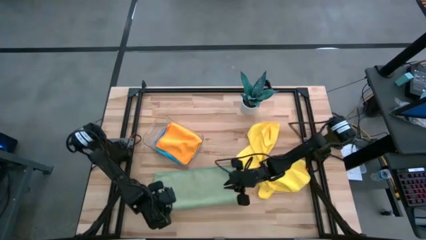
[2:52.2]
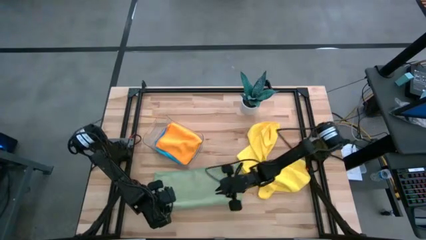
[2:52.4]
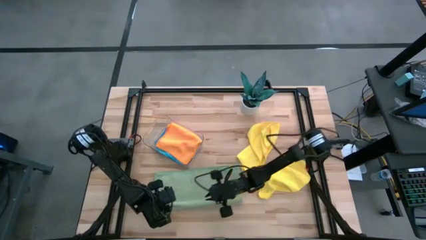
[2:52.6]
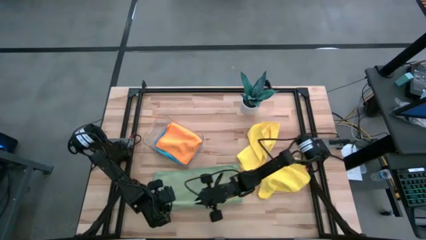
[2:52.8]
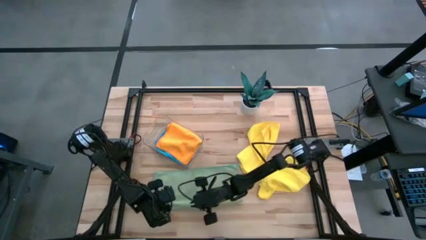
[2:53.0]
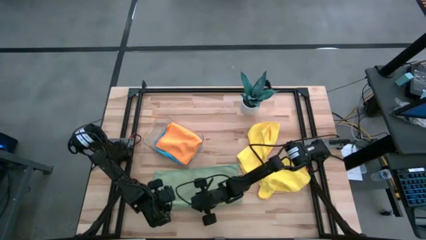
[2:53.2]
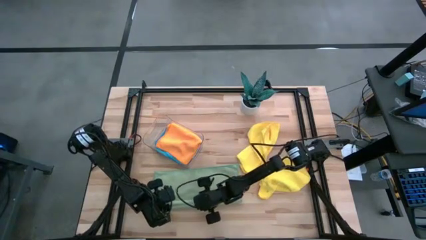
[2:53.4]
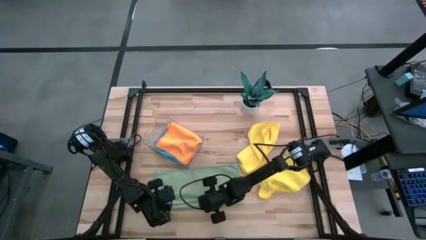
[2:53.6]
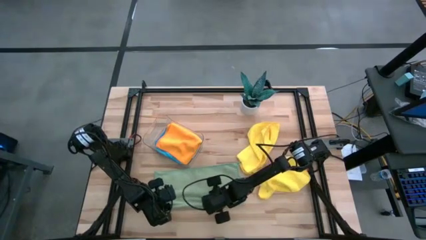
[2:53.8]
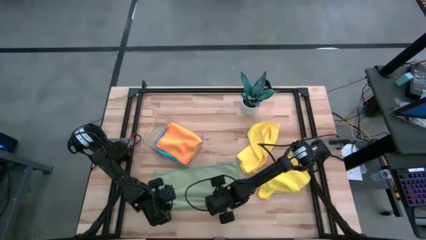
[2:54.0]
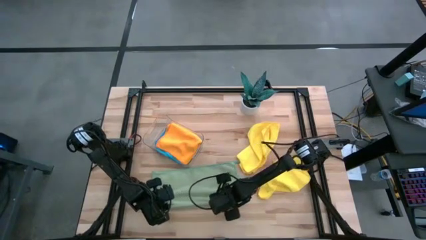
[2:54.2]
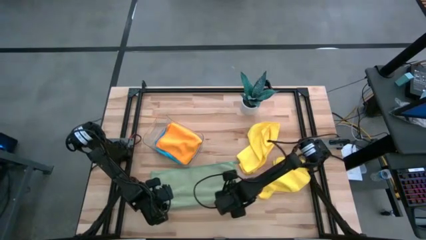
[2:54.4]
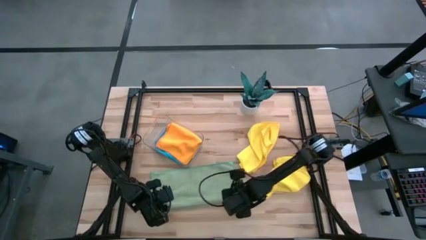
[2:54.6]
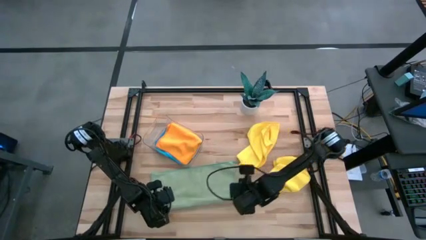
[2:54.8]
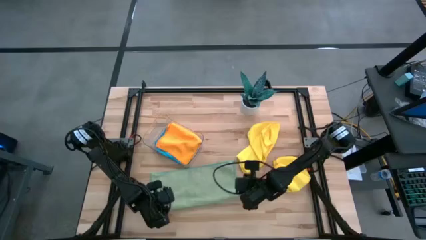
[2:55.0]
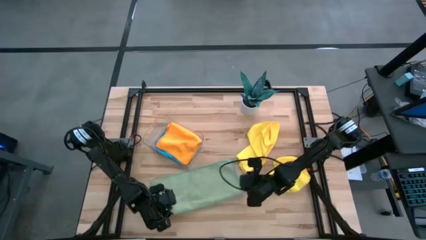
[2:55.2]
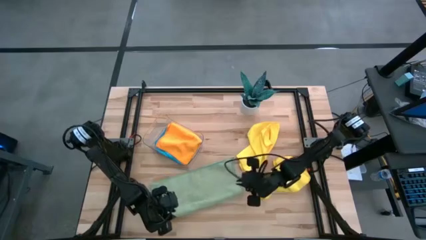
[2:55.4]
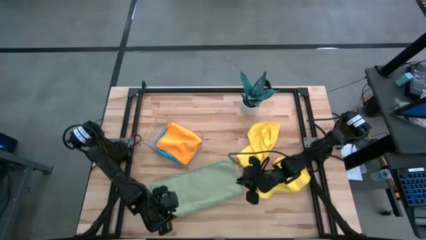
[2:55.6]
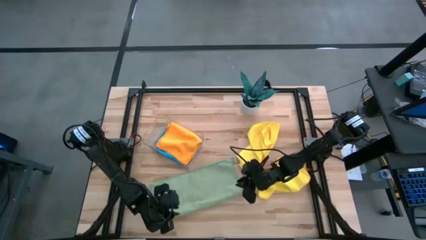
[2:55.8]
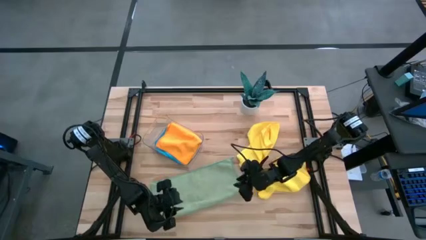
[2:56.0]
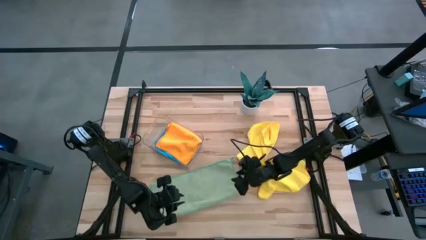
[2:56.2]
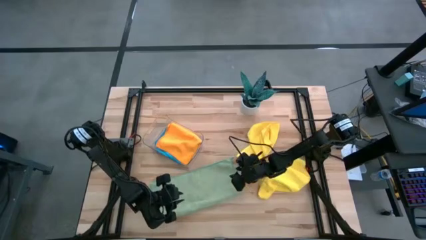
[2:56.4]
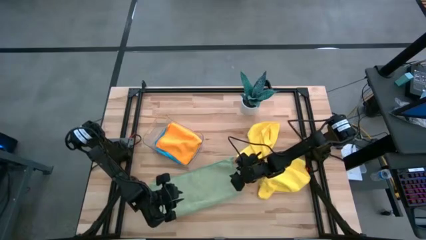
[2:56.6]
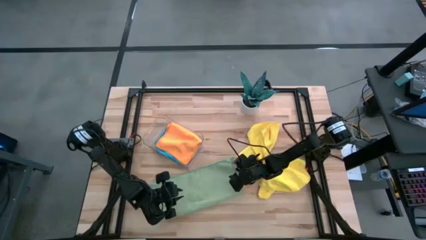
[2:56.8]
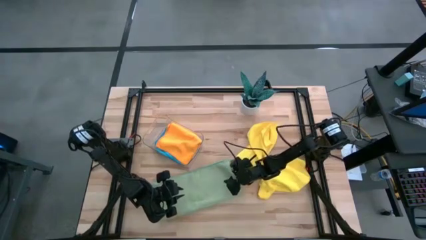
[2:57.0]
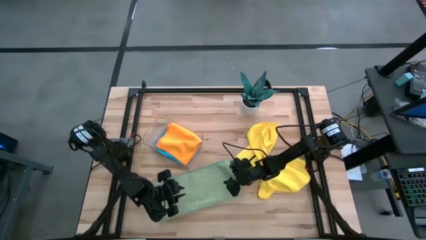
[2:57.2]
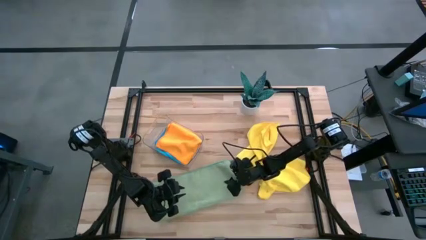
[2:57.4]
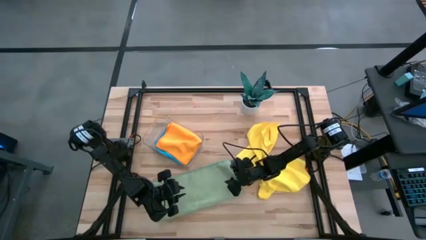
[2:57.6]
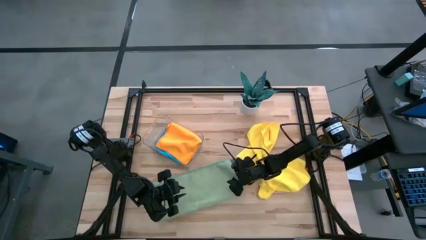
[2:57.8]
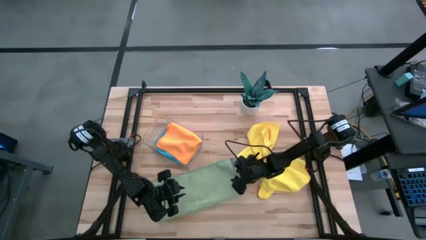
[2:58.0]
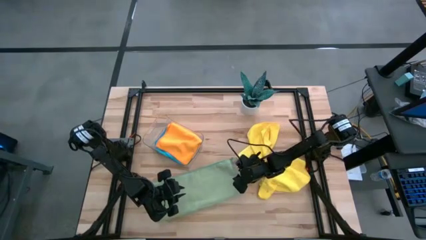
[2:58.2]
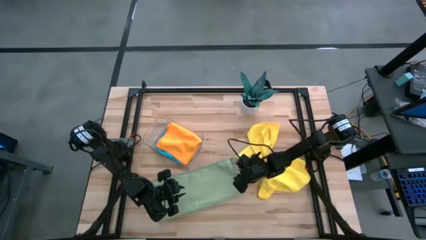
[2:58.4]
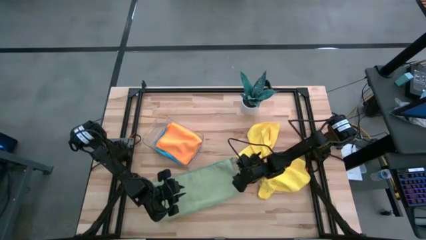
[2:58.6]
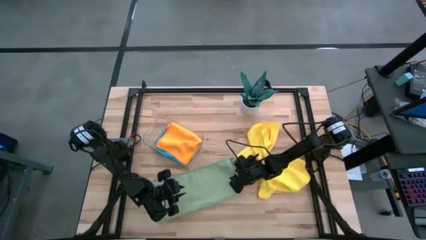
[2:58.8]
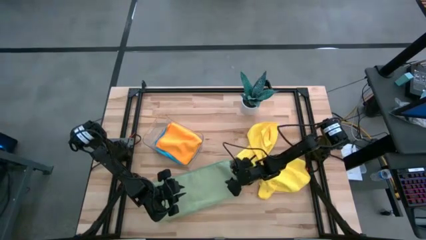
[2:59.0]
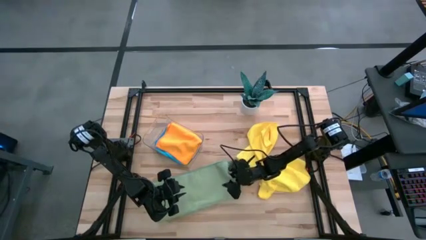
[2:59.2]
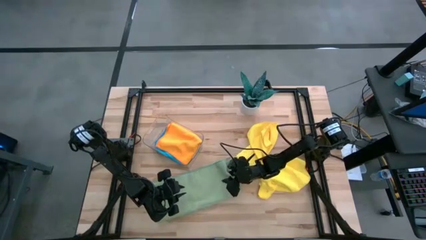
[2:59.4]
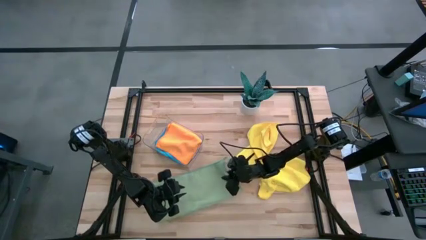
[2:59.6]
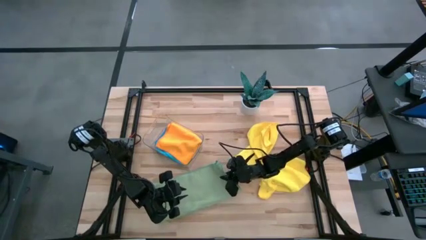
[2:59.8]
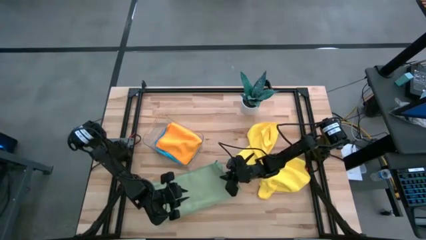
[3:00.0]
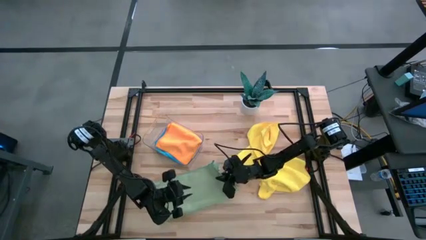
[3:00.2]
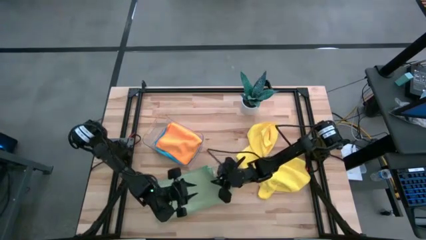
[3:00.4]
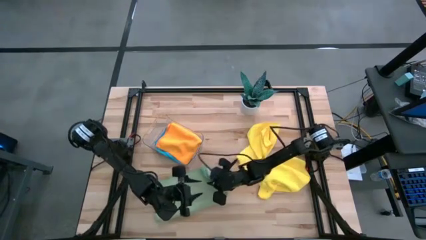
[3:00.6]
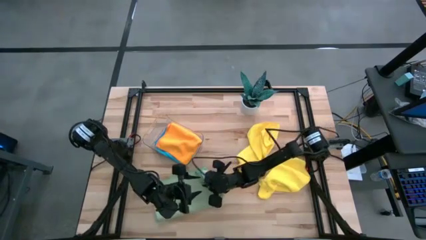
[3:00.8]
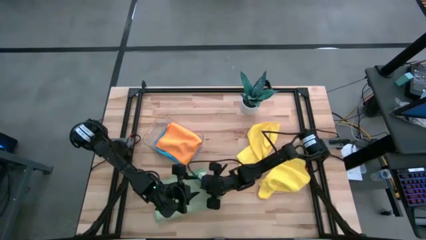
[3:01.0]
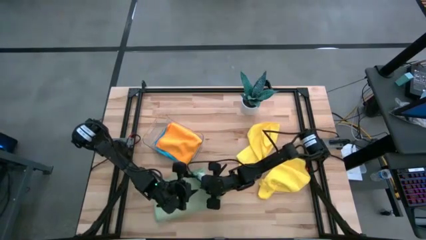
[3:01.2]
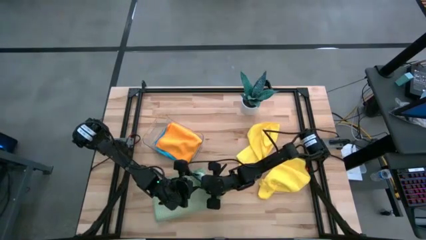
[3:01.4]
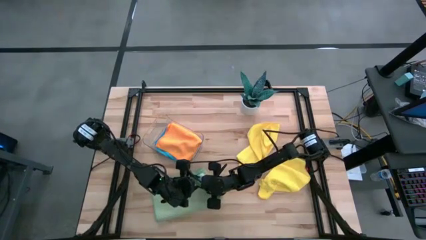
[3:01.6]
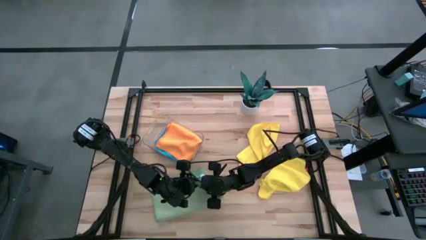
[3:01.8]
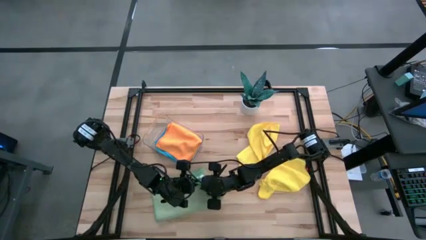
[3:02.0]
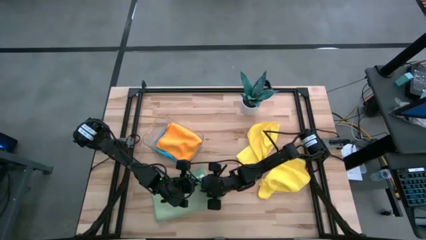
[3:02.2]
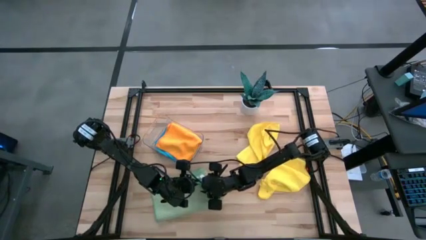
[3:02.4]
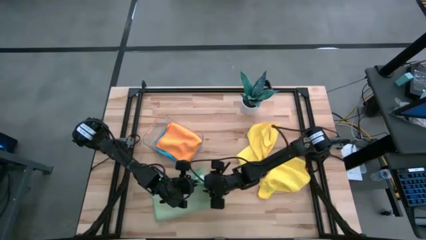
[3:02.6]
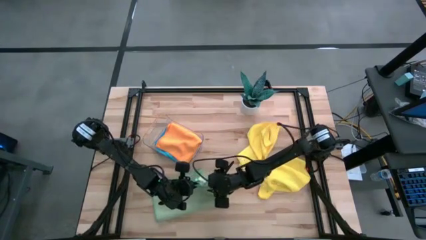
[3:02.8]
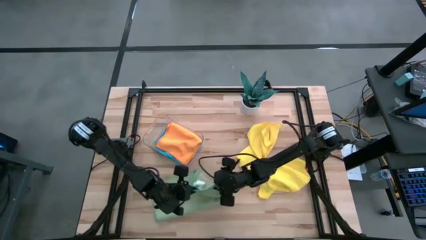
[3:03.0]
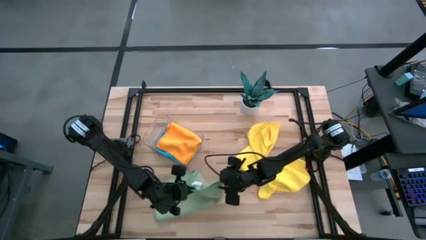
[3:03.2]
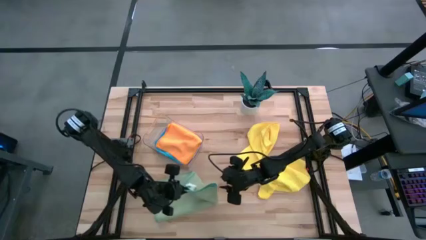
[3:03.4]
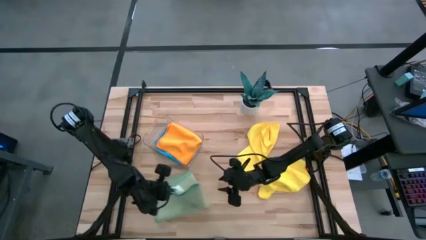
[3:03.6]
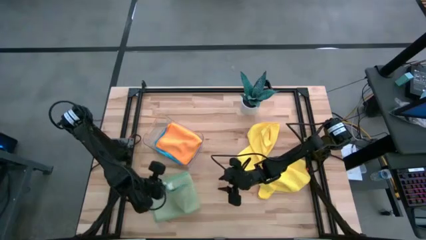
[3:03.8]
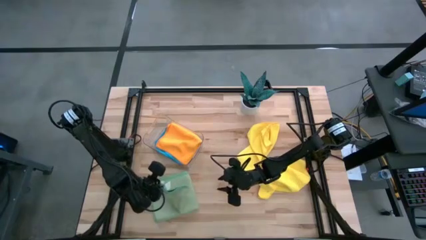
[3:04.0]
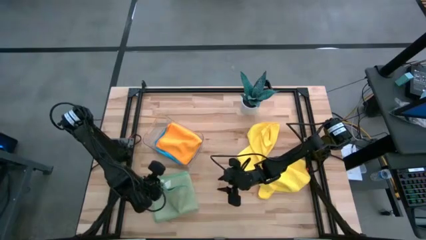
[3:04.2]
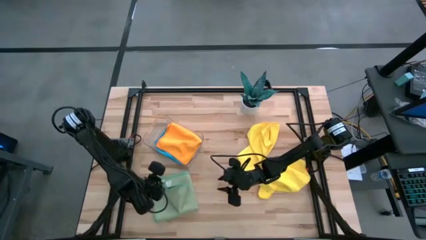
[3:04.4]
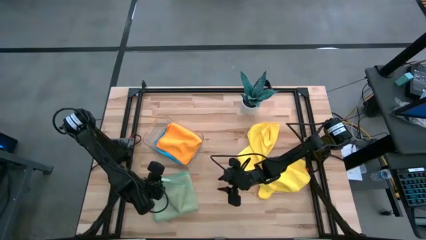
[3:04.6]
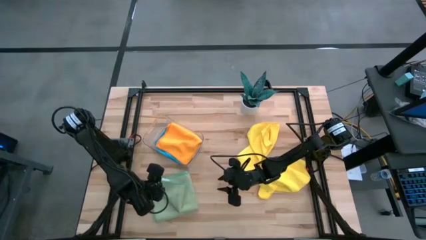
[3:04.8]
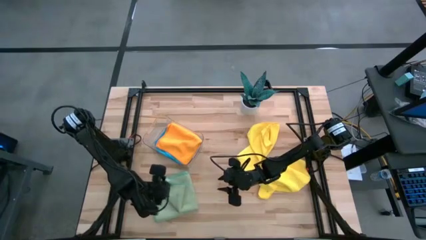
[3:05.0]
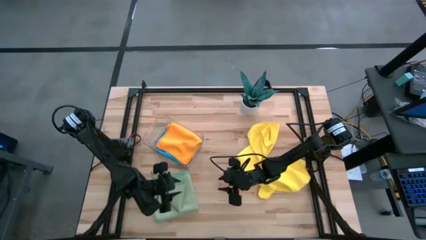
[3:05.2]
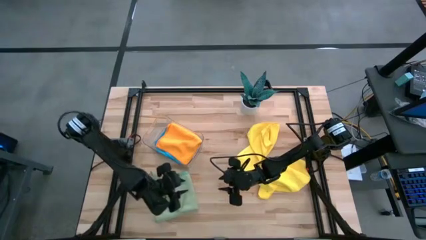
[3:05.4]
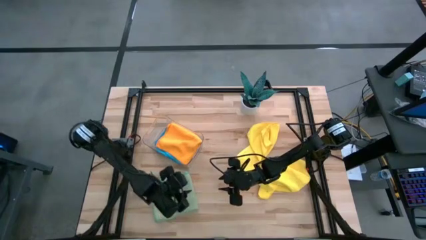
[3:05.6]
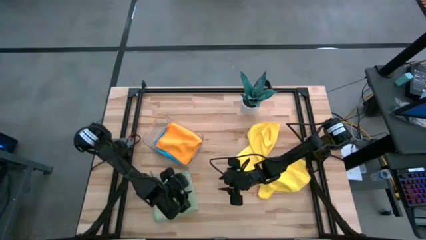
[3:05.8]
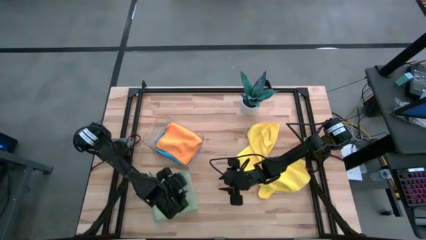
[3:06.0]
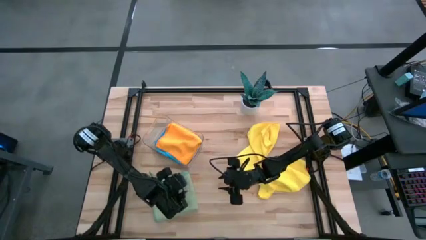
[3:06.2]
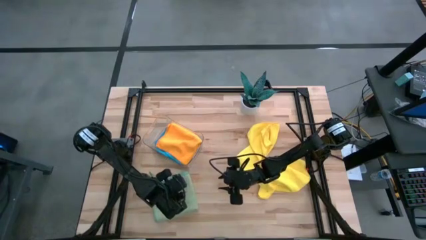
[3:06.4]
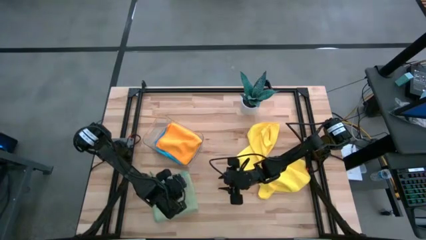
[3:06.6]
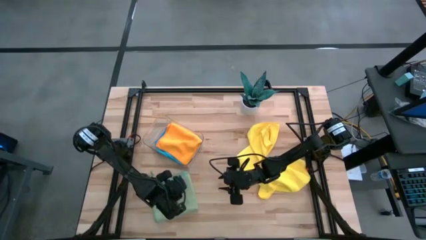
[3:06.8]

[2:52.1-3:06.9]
Task: Fold microfiber towels
Fold the green microfiber cloth
